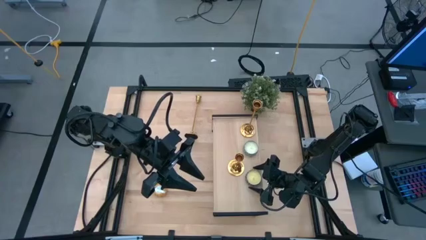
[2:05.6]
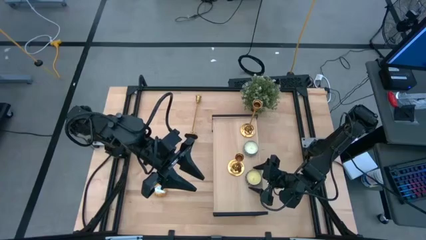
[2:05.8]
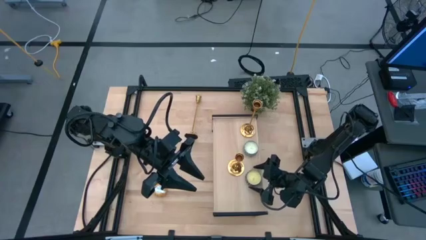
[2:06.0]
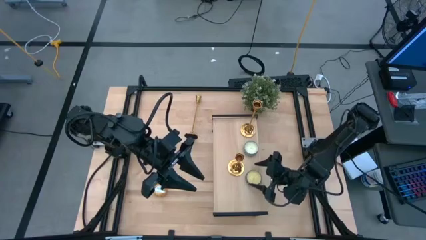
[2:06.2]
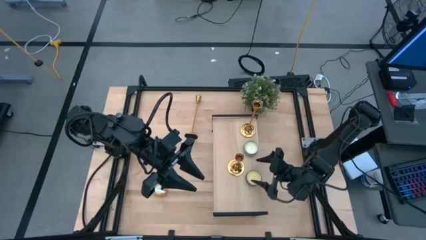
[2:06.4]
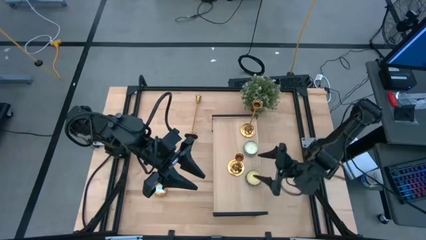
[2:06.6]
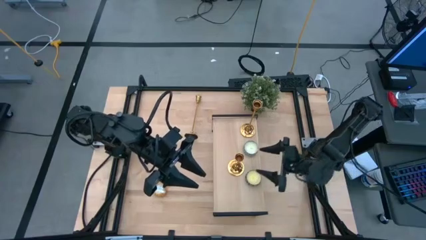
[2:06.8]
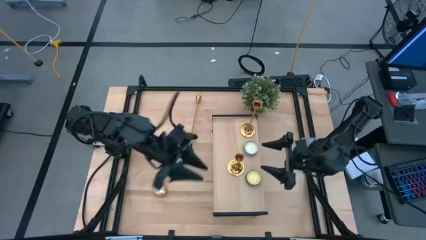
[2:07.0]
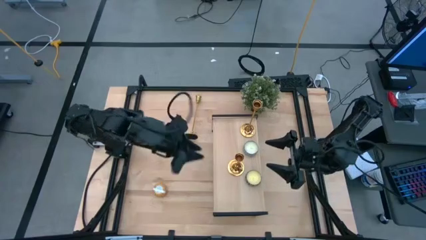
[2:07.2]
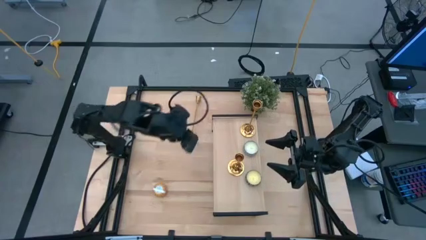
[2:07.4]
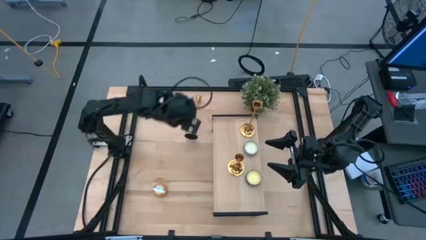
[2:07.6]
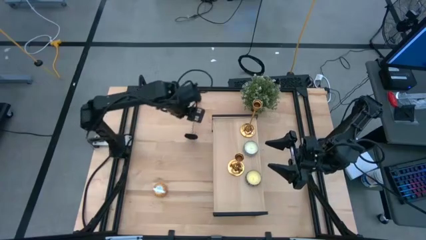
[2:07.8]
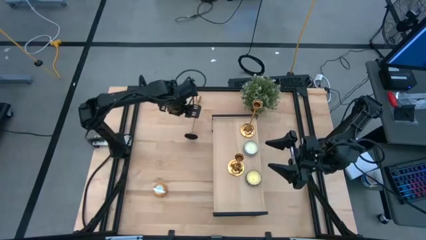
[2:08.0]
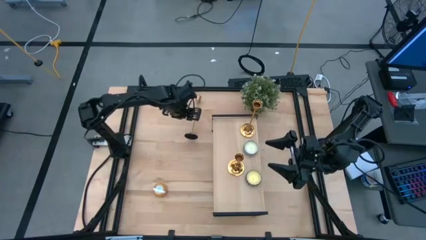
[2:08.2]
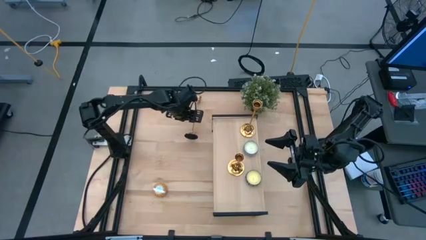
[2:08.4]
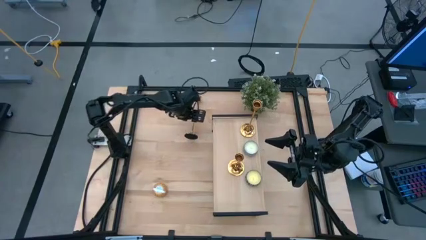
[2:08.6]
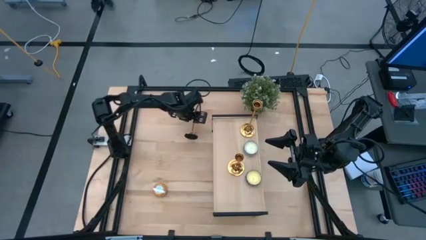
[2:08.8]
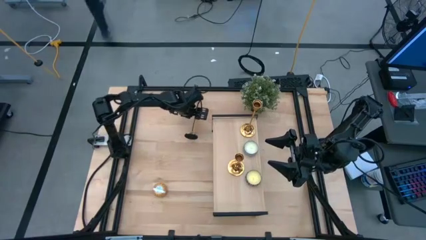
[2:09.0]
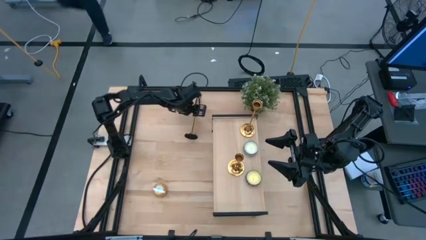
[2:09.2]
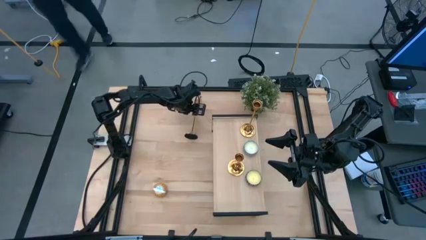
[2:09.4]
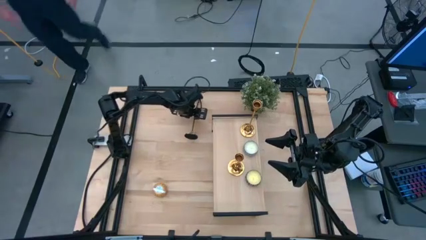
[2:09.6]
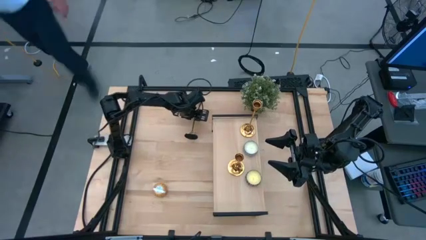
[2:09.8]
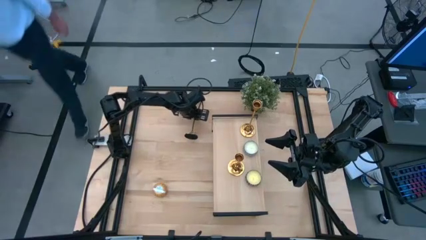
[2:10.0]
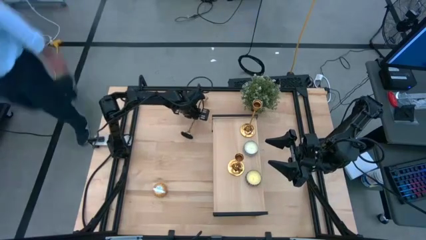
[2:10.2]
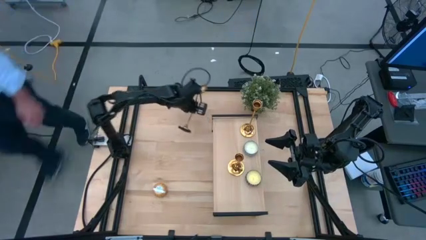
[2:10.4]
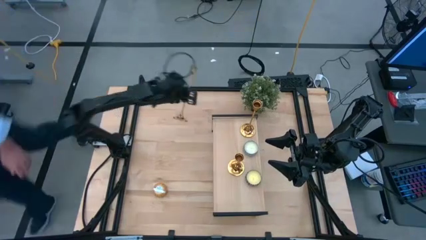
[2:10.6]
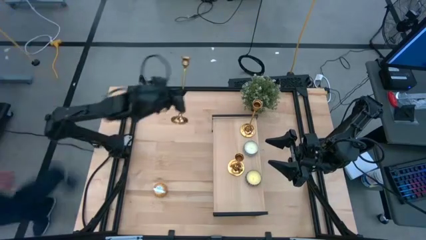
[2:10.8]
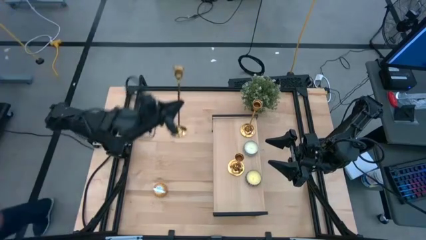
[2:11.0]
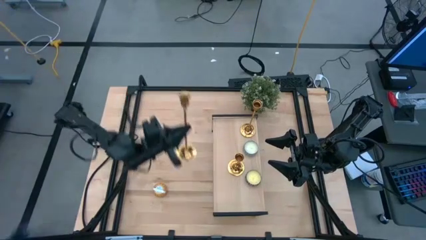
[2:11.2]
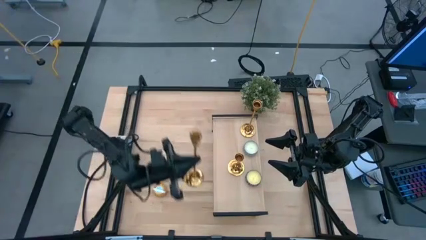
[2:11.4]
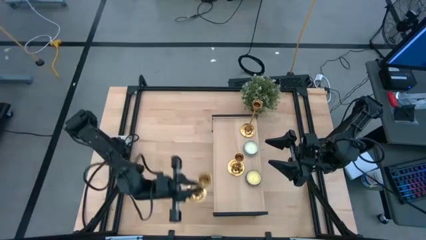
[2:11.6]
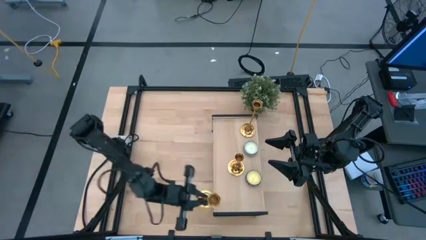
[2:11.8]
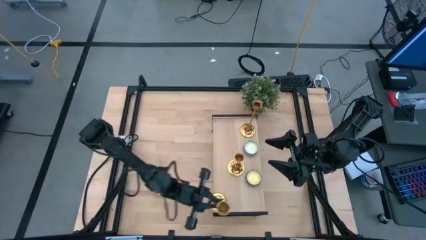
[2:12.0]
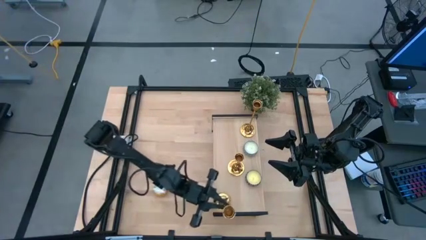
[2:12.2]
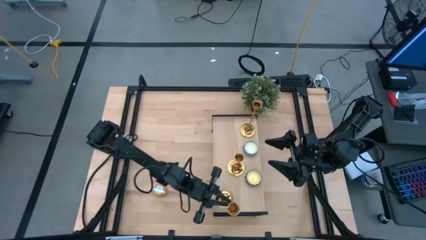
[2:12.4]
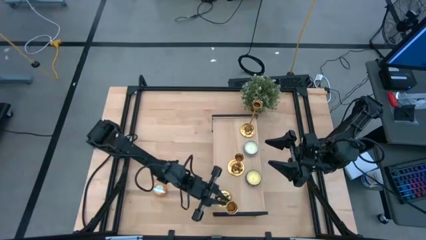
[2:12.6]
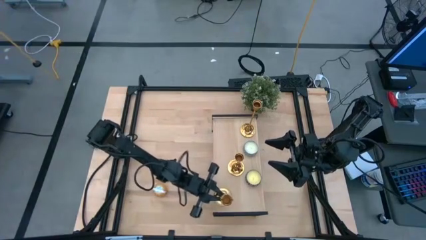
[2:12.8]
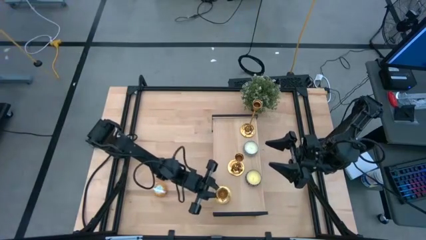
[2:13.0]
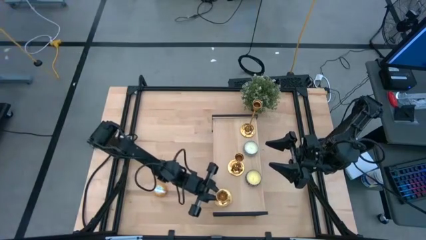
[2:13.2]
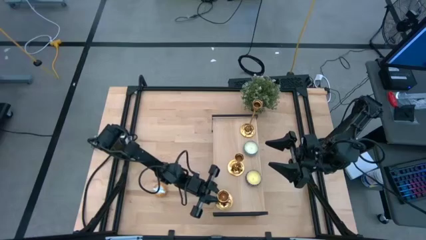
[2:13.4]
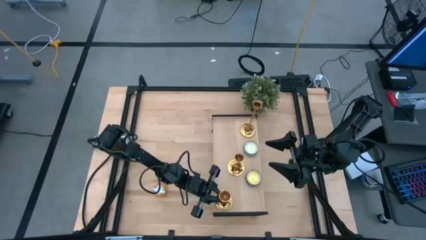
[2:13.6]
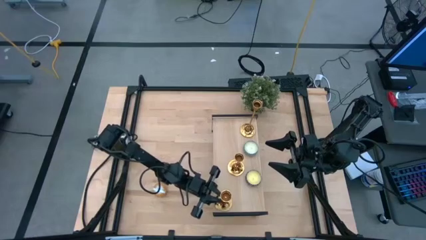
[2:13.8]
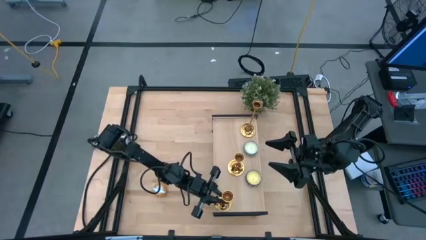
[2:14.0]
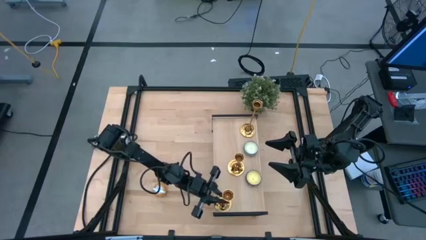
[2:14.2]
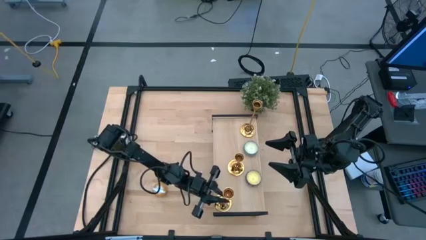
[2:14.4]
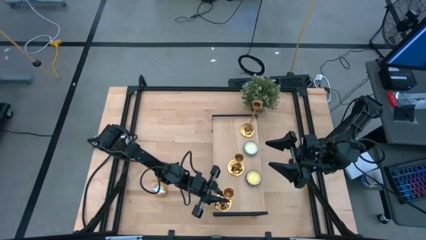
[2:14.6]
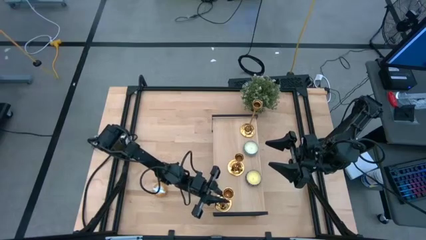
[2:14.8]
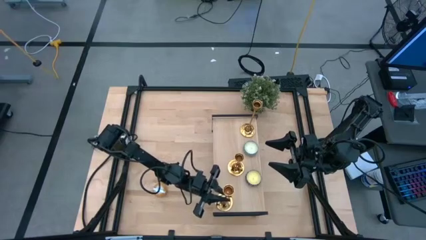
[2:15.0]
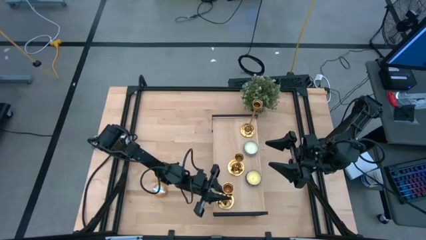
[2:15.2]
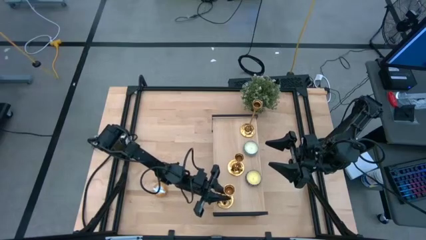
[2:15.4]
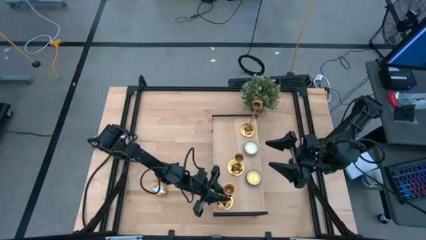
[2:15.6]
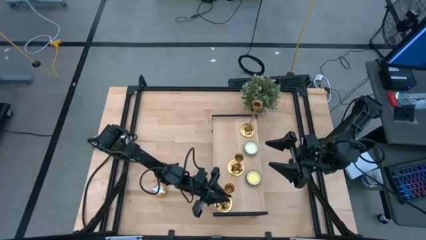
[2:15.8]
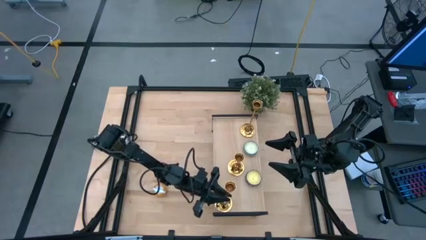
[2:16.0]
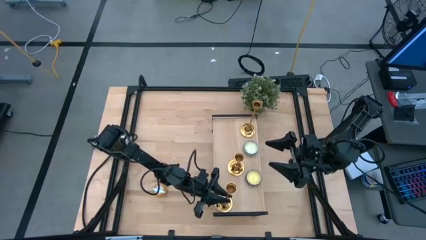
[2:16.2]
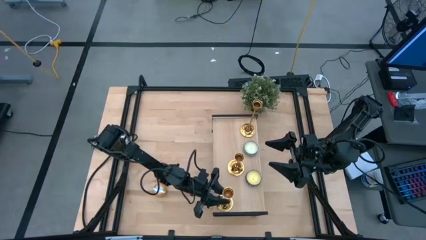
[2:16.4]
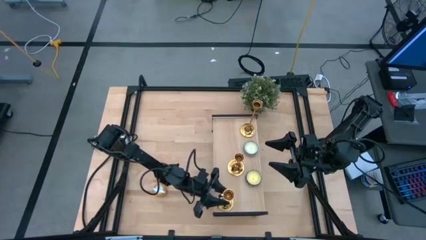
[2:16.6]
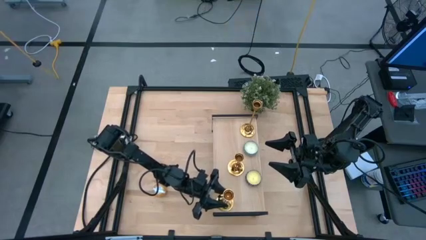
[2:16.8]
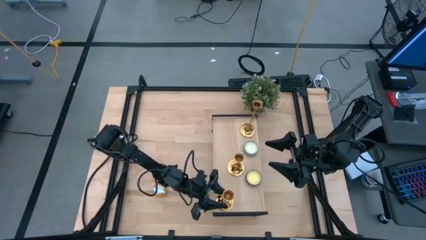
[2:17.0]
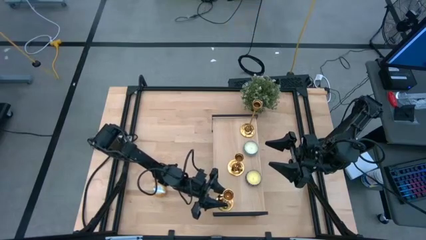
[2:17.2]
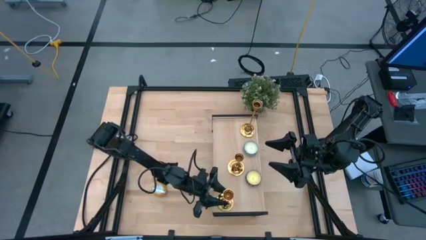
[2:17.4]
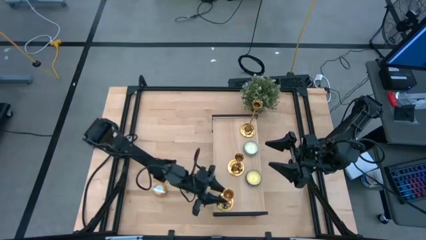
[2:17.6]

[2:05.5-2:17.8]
Task: Pick & Place candle stick holders
Put the gold candle holder on the shelf

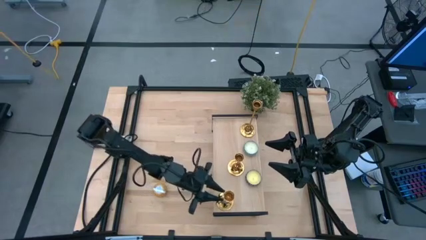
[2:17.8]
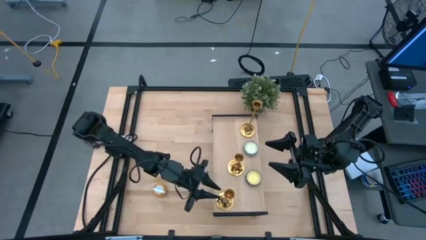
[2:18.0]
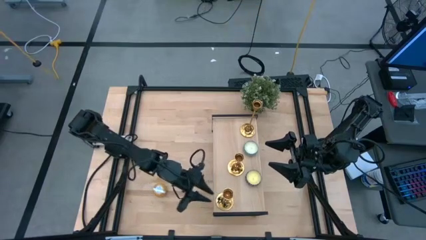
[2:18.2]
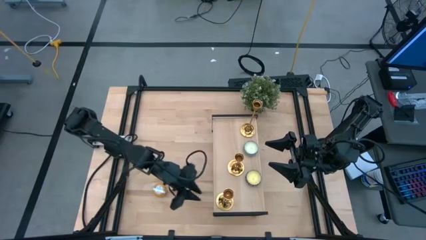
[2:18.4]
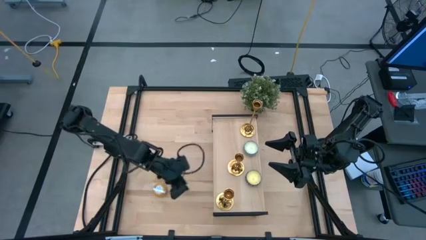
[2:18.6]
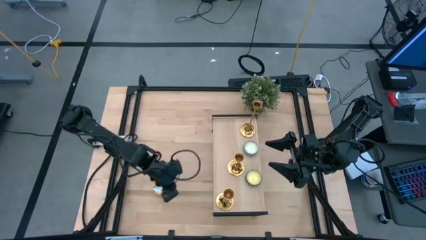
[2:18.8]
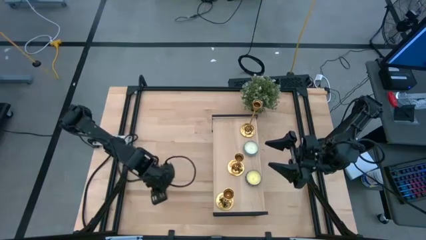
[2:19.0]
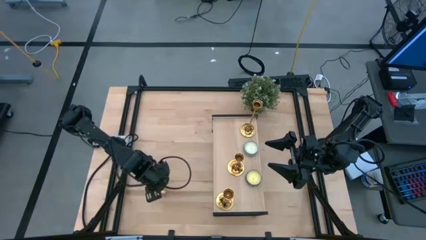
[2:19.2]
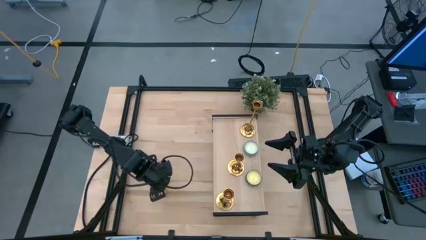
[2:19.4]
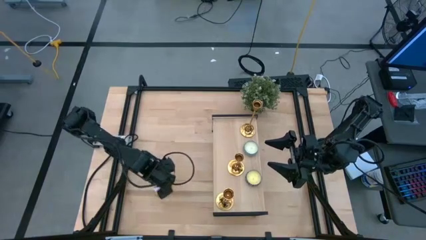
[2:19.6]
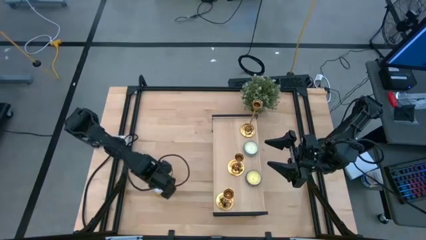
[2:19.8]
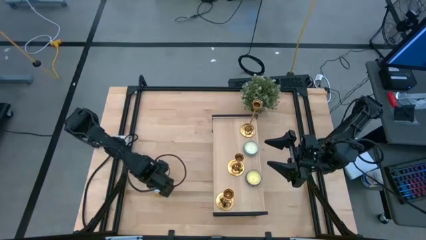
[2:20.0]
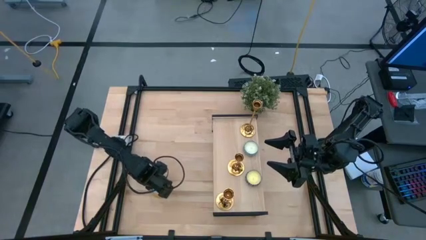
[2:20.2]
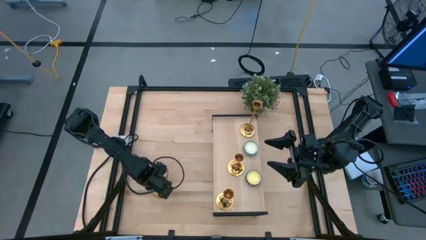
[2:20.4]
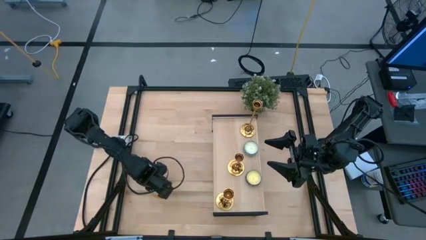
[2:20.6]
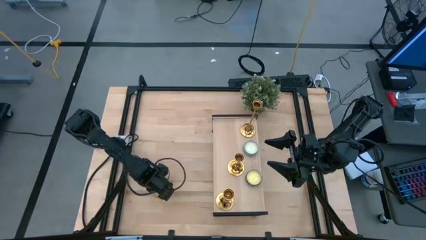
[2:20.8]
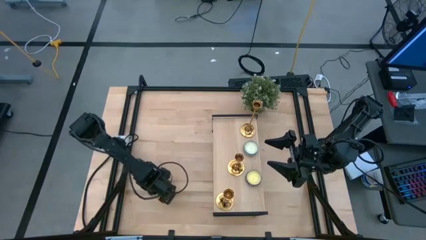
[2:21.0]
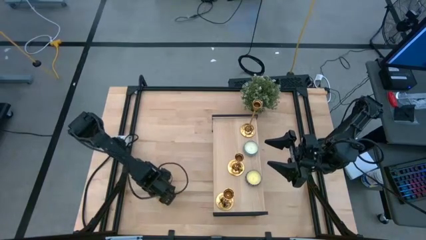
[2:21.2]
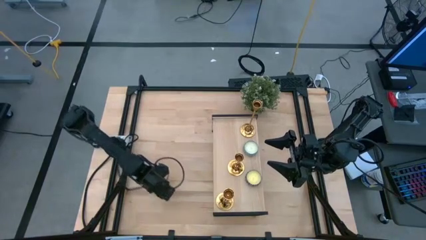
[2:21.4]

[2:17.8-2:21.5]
Put the orange patterned scented candle on the shelf
